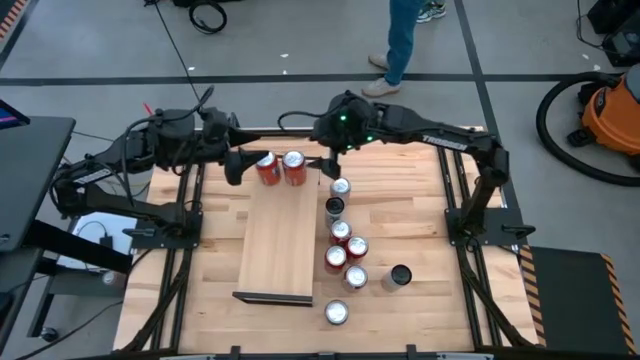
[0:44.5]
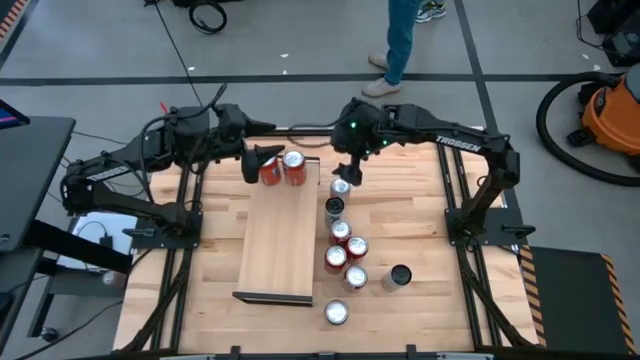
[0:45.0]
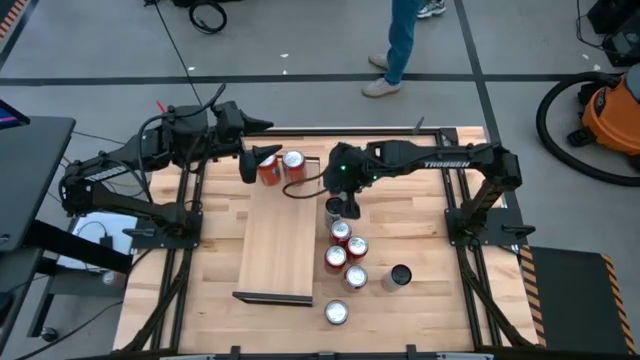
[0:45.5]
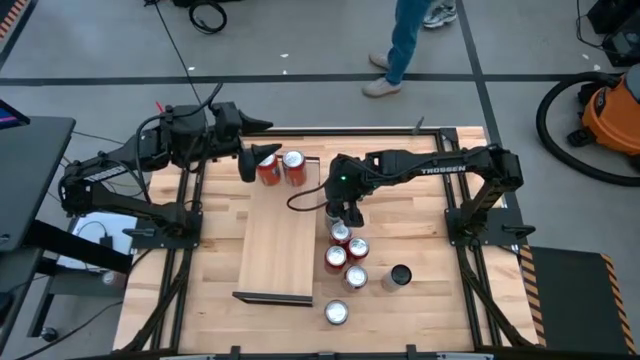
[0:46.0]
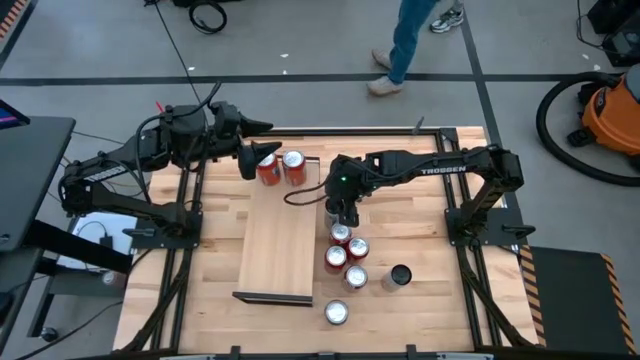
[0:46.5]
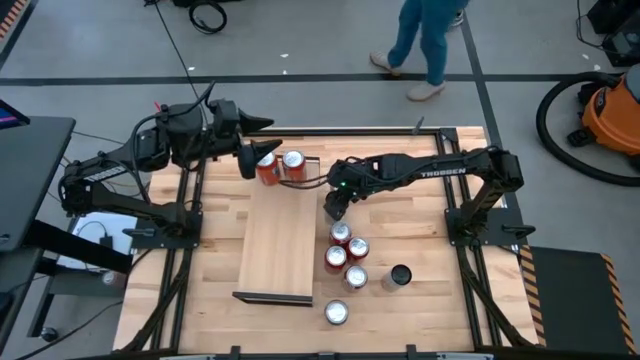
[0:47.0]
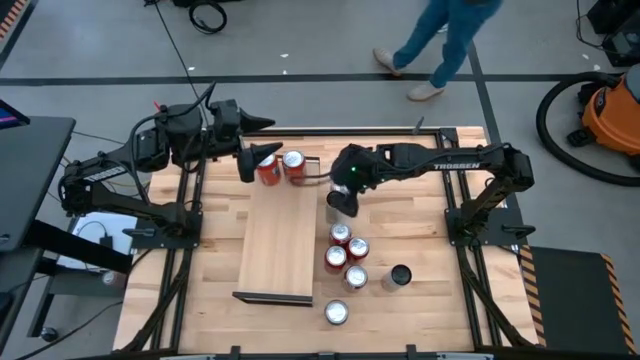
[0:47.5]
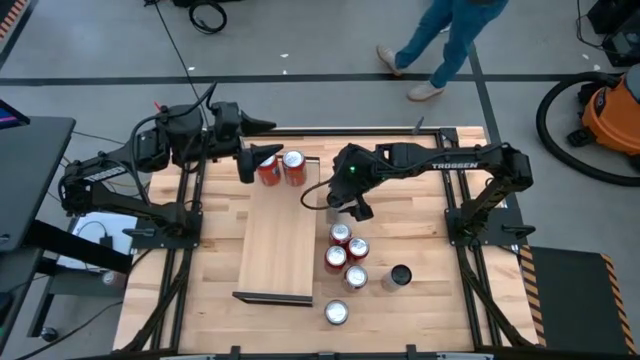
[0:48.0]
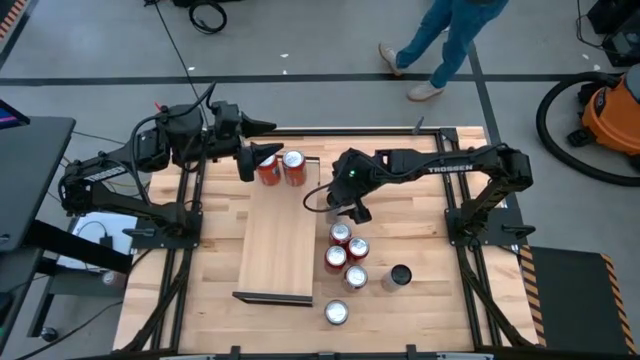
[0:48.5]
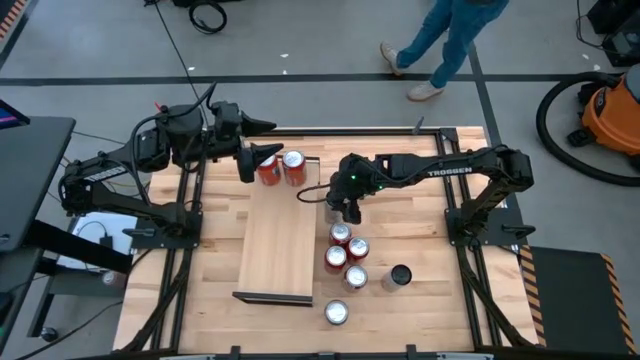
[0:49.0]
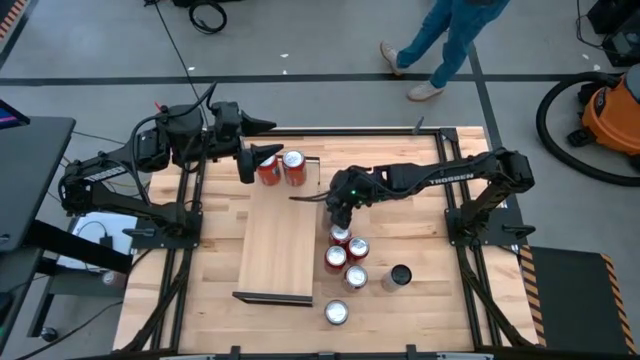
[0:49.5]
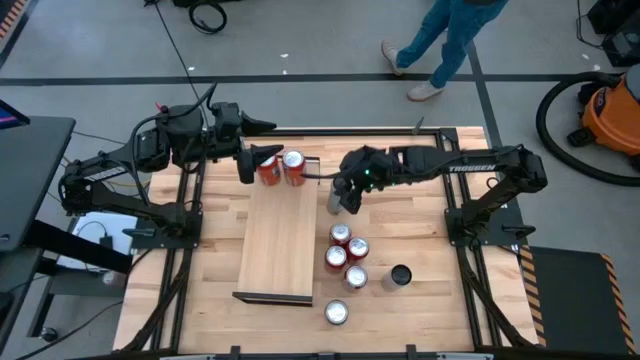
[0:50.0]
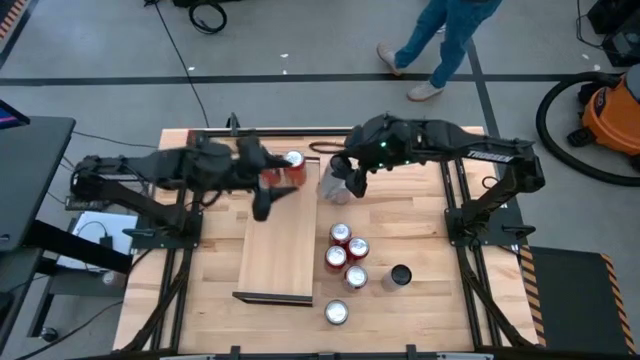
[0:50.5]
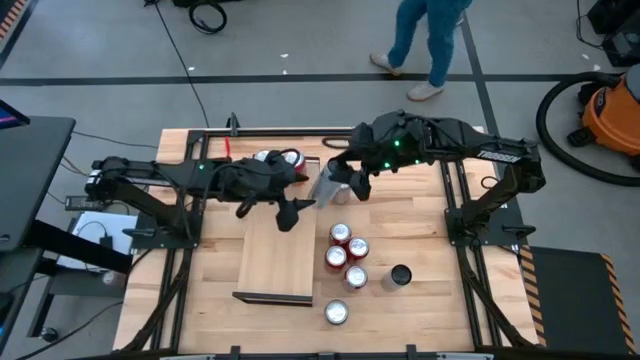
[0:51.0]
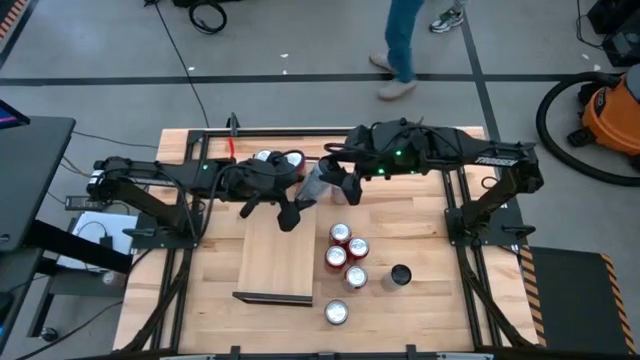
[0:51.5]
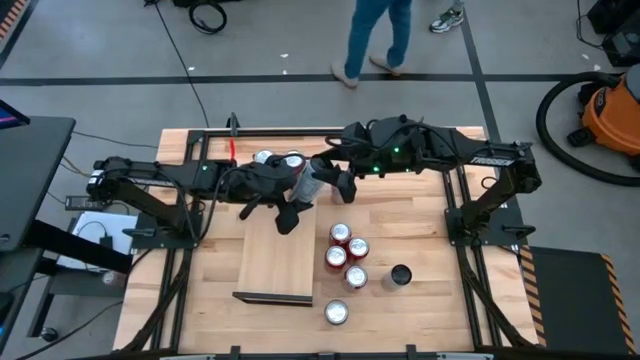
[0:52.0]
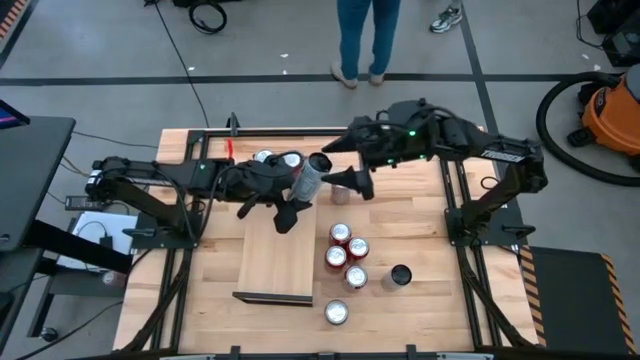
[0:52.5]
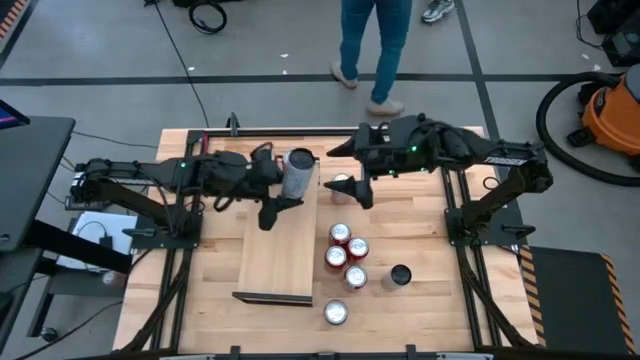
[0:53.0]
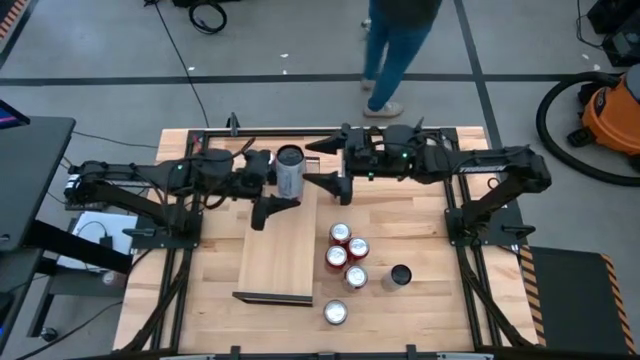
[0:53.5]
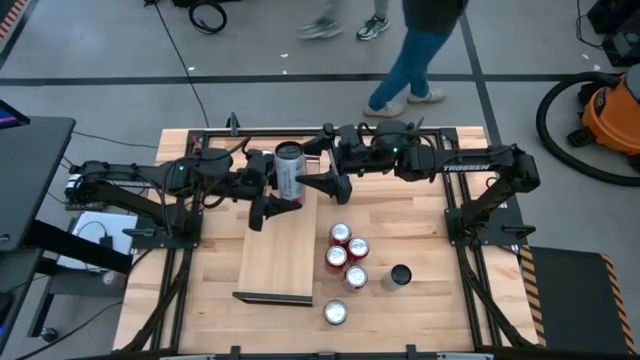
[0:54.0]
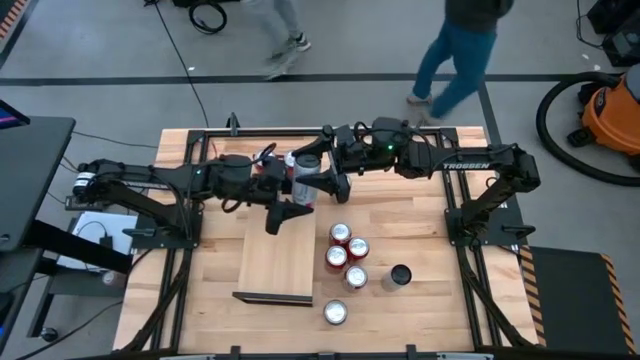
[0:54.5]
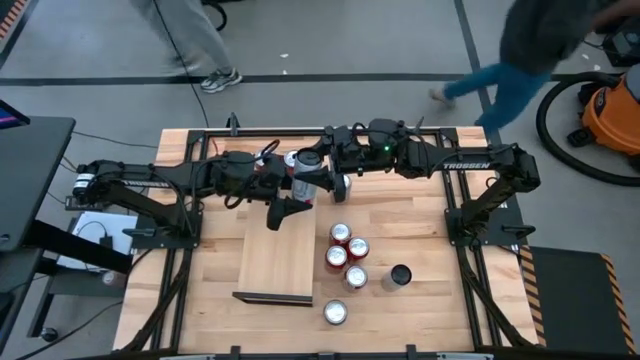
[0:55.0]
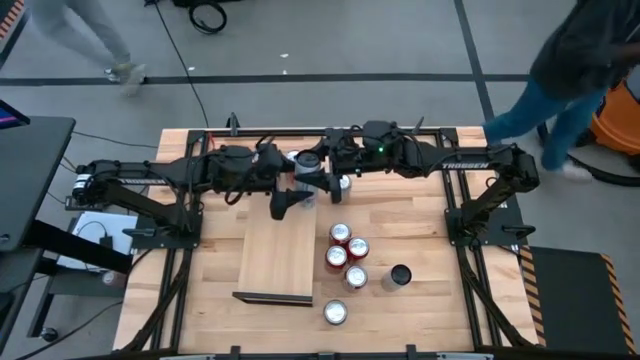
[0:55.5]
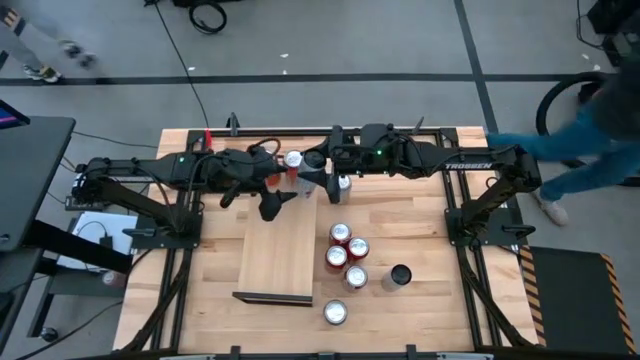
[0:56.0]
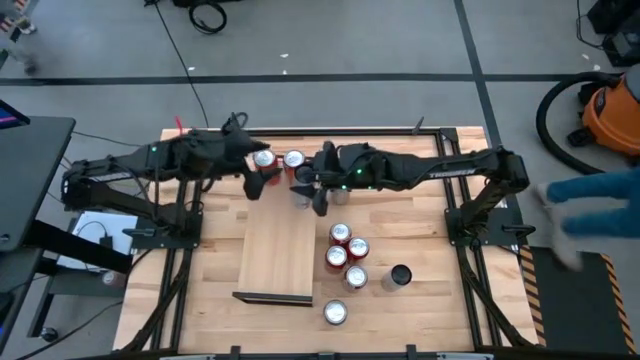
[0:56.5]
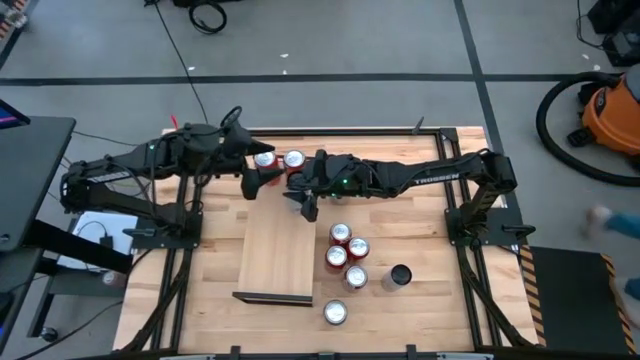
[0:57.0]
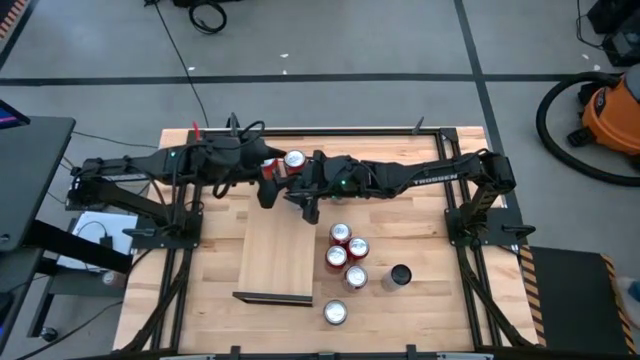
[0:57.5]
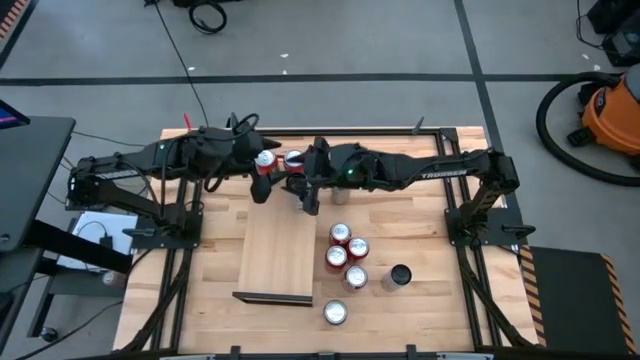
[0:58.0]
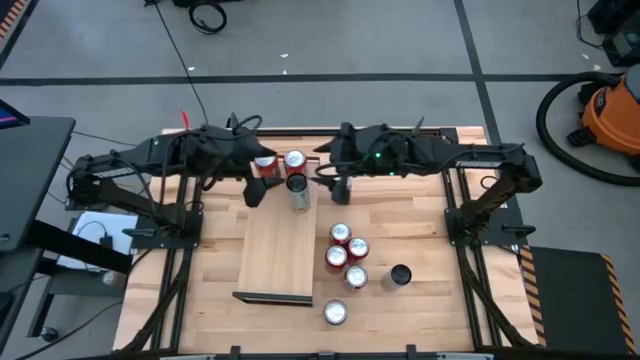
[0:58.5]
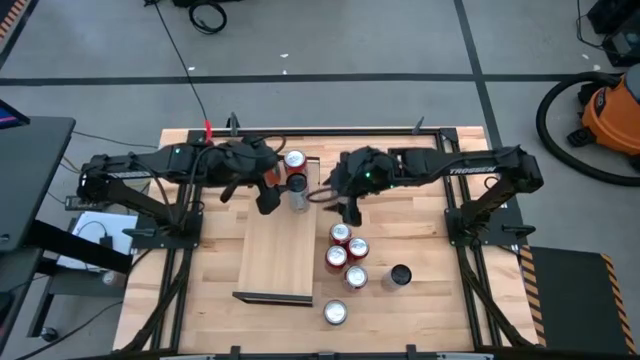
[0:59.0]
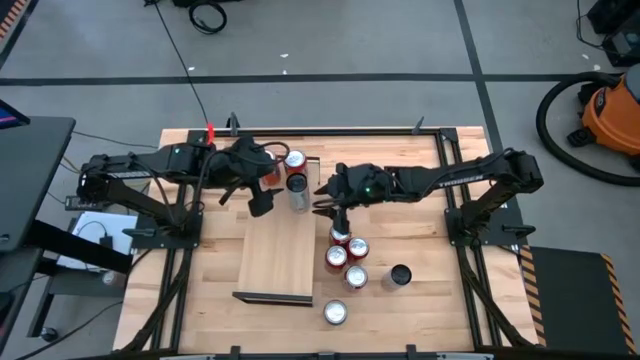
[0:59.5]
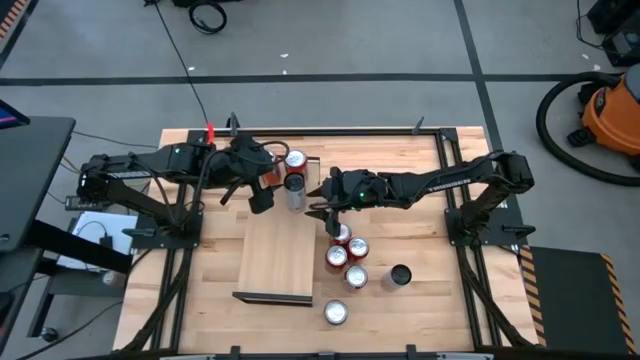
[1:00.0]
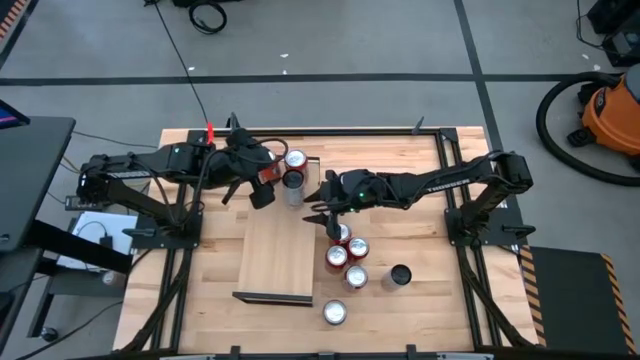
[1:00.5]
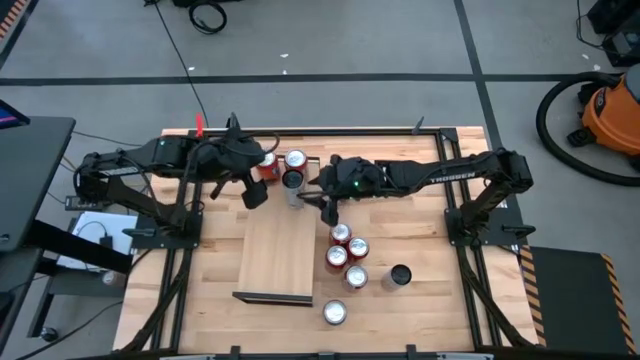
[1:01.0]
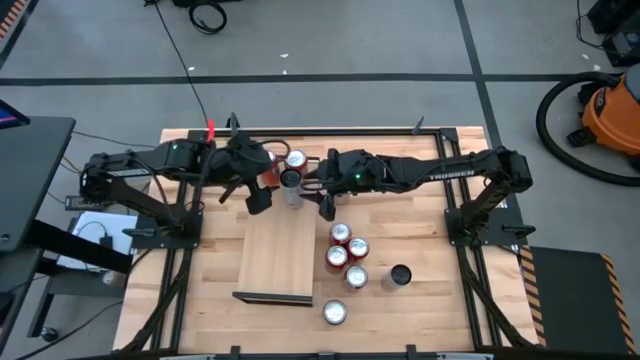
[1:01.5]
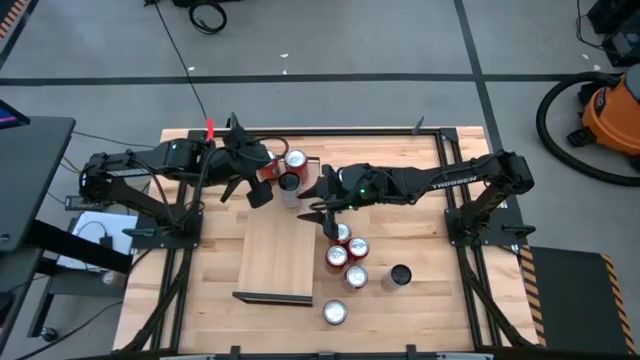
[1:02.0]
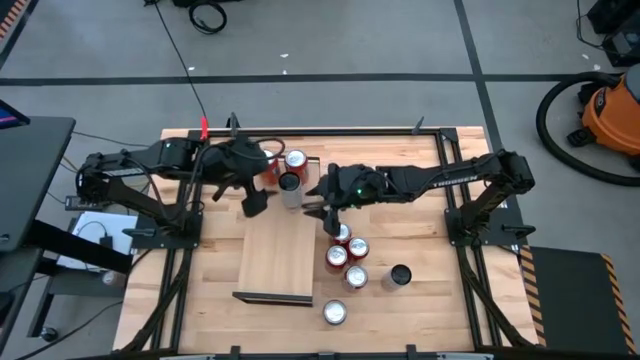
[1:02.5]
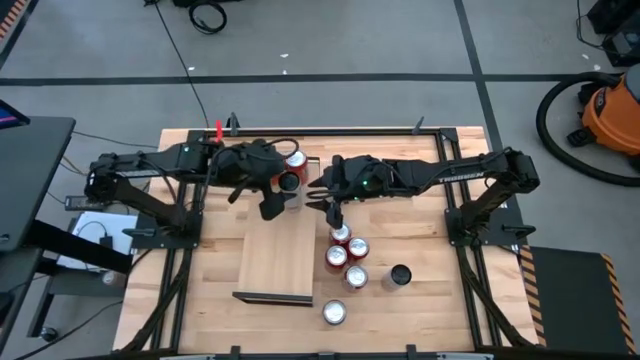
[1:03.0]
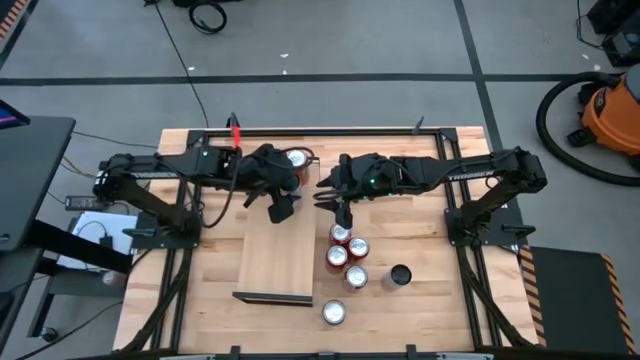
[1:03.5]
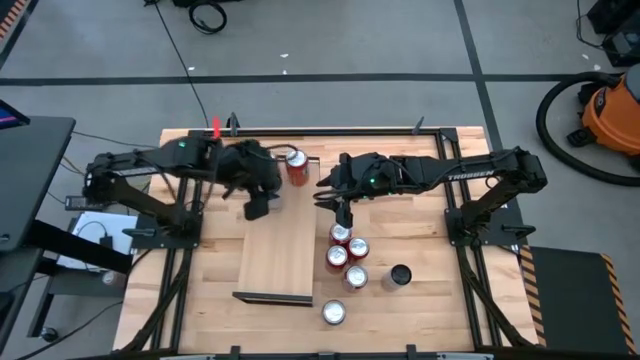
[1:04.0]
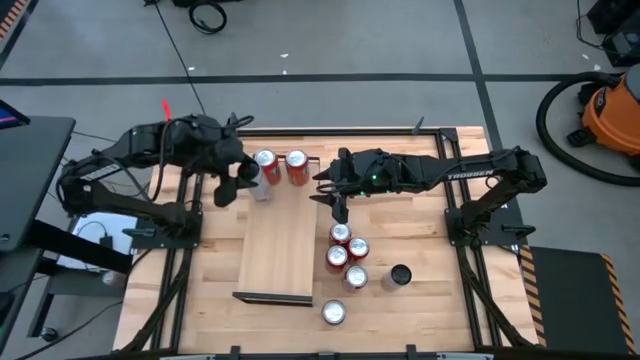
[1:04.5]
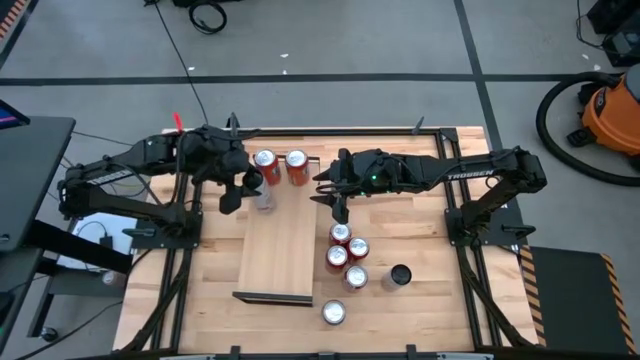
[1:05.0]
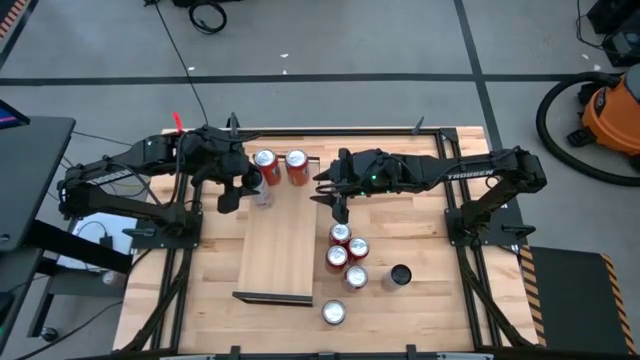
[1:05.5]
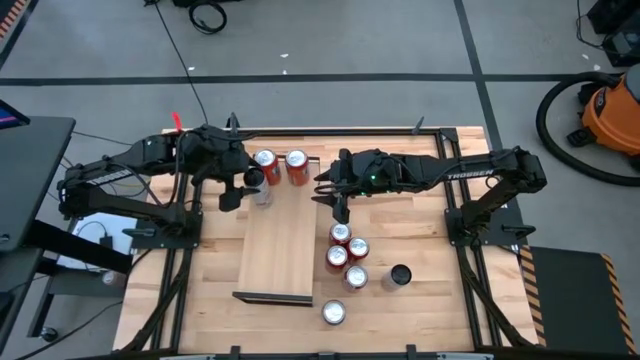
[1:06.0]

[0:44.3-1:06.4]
Task: Place canned beverage on shelf
Put the top white and orange soda can on the shelf
